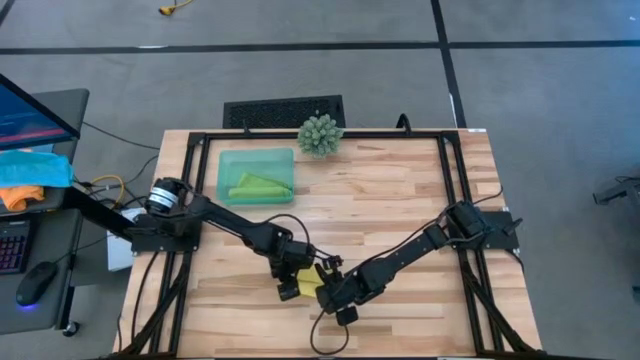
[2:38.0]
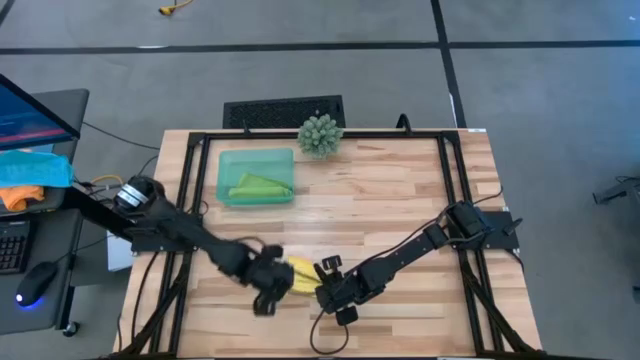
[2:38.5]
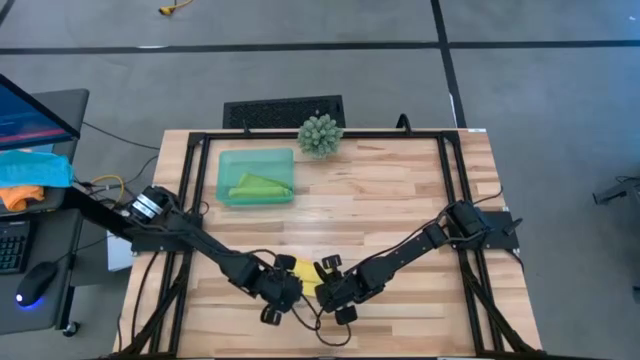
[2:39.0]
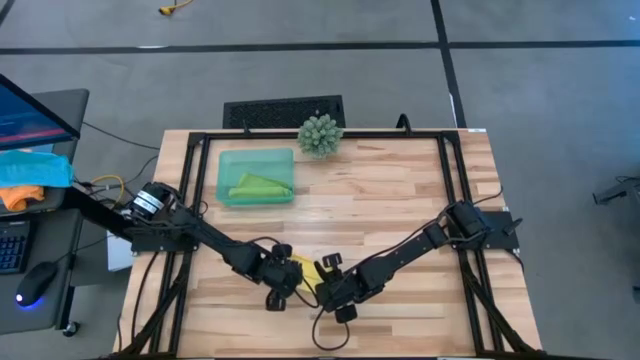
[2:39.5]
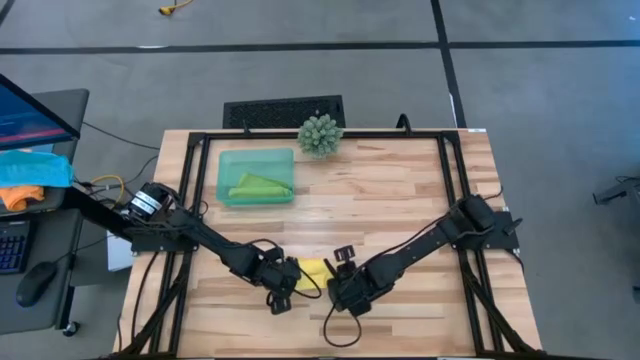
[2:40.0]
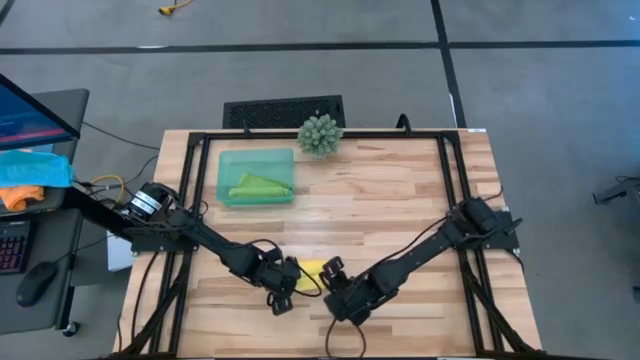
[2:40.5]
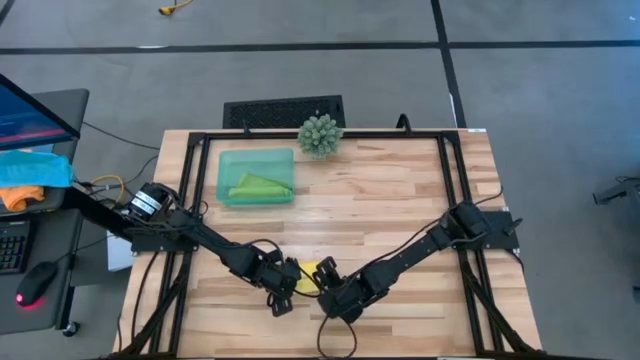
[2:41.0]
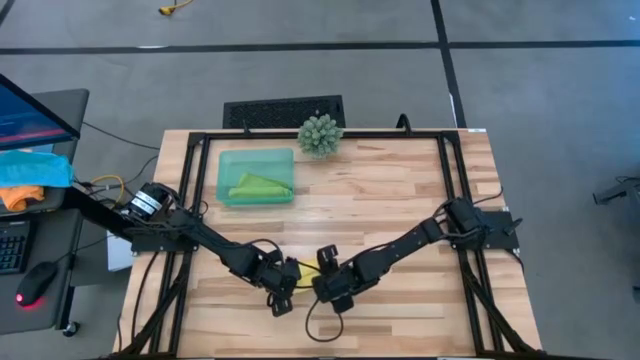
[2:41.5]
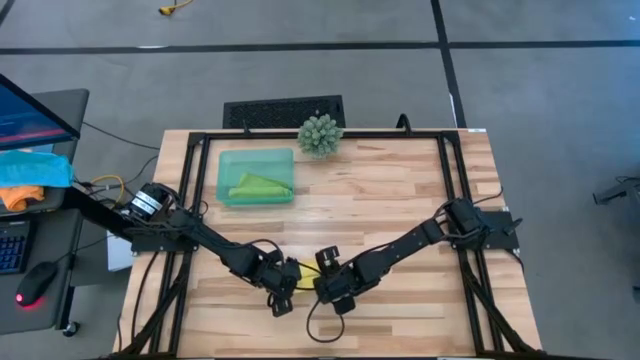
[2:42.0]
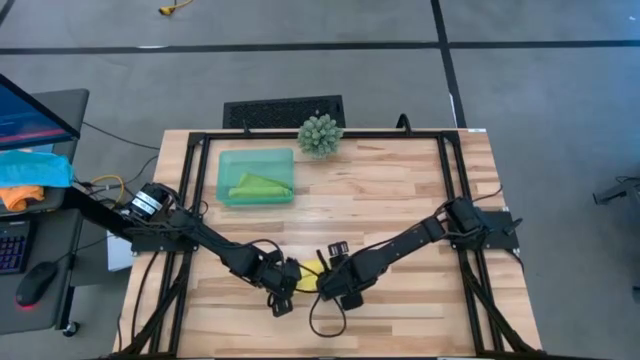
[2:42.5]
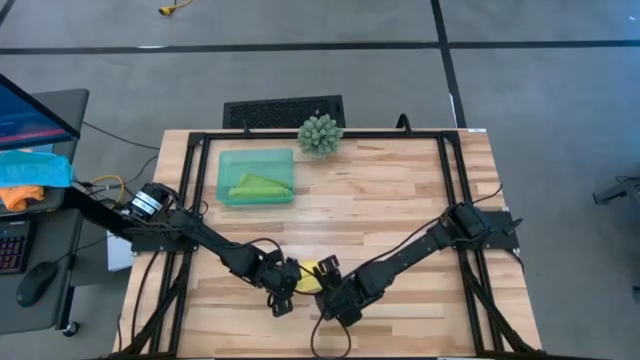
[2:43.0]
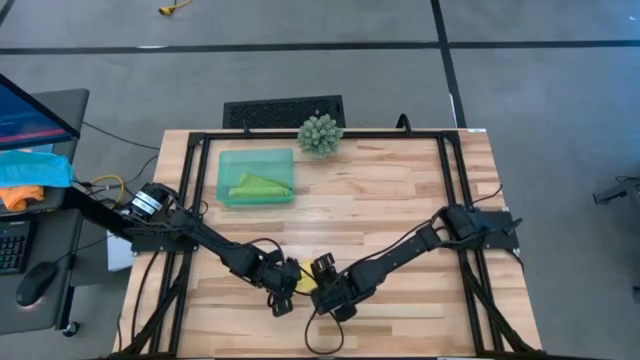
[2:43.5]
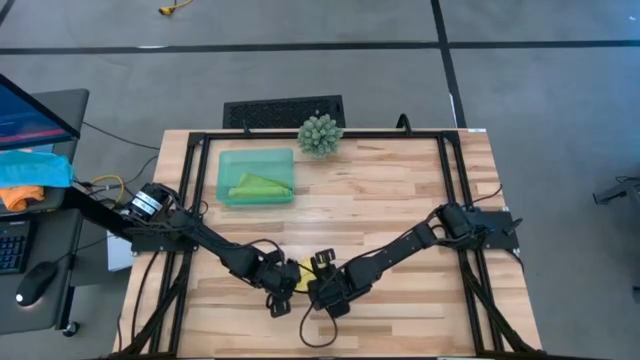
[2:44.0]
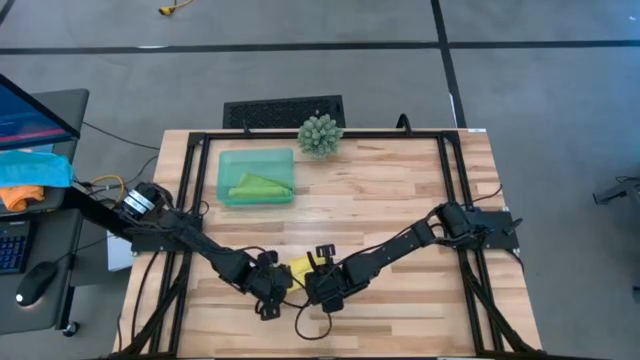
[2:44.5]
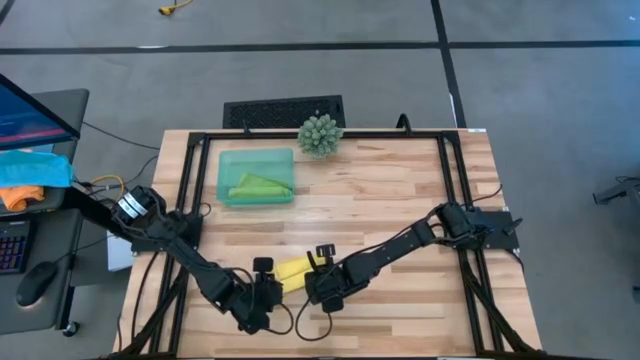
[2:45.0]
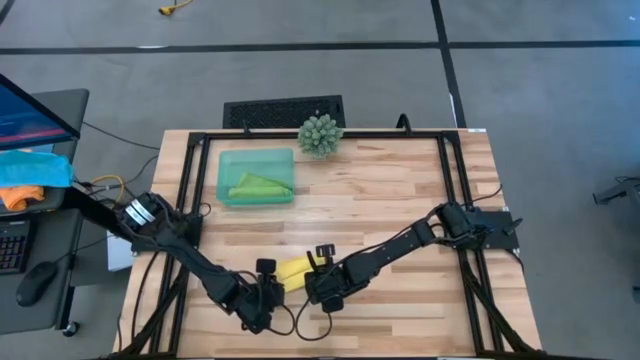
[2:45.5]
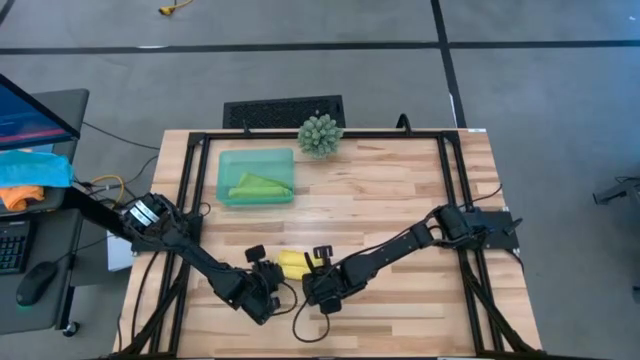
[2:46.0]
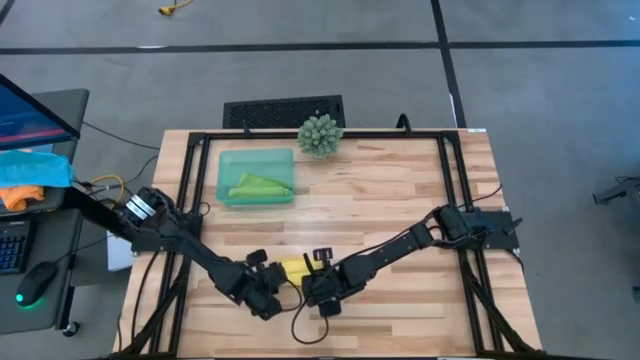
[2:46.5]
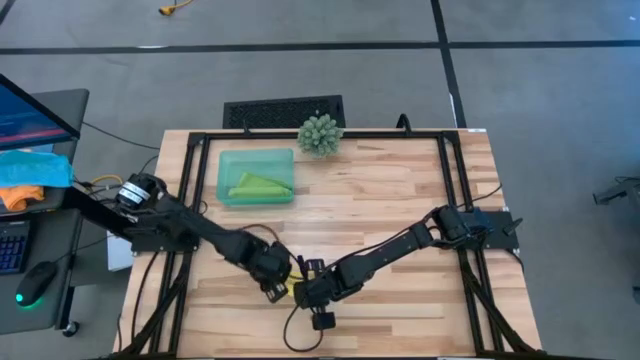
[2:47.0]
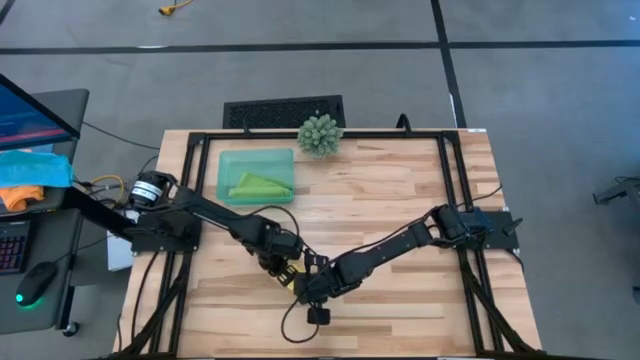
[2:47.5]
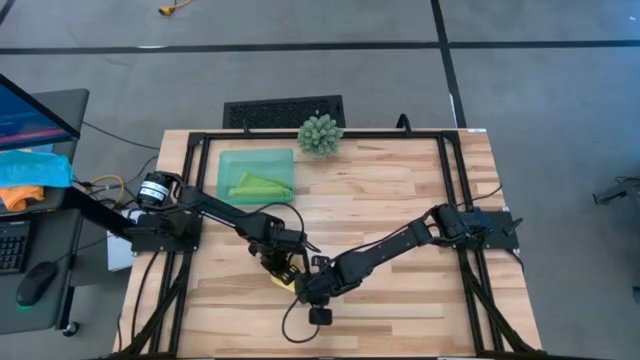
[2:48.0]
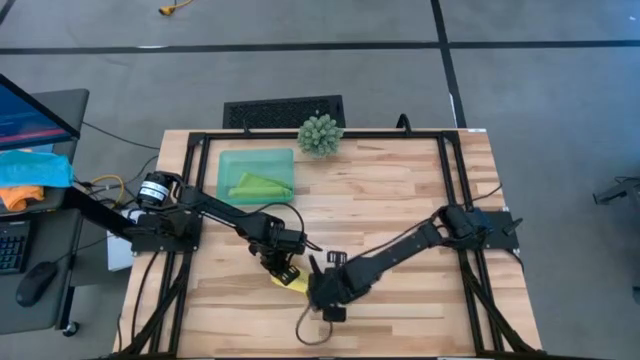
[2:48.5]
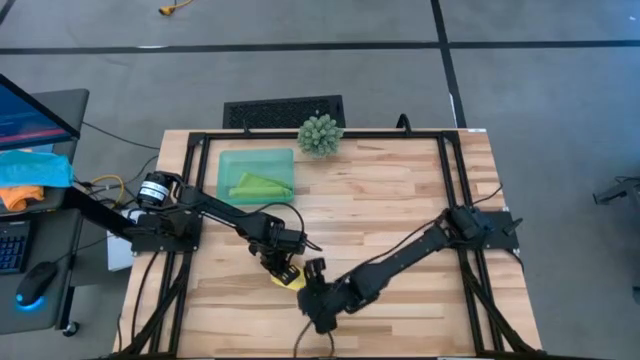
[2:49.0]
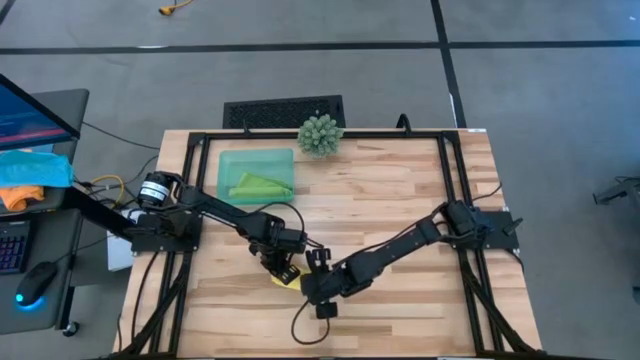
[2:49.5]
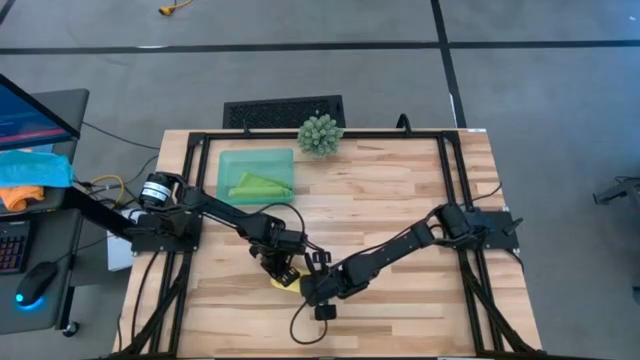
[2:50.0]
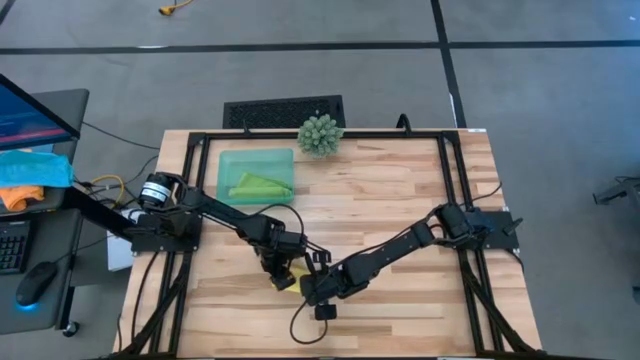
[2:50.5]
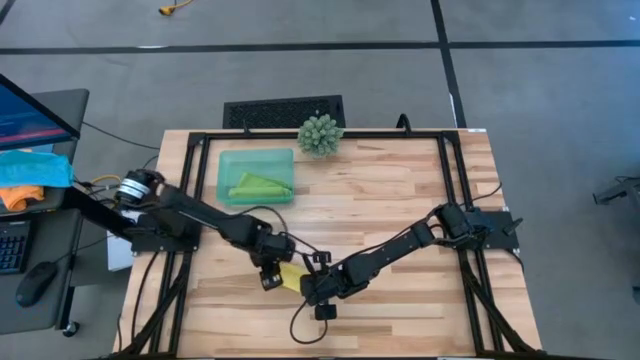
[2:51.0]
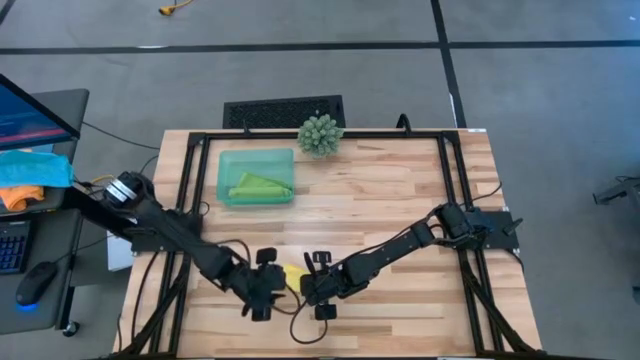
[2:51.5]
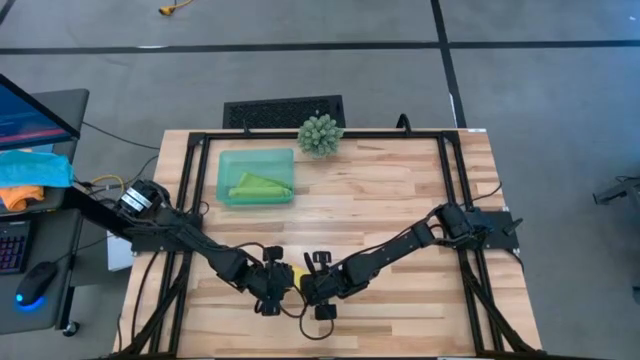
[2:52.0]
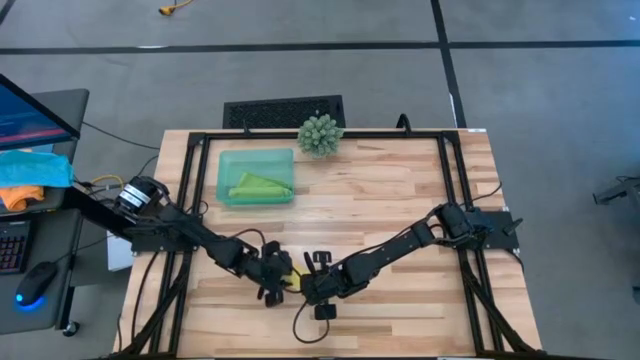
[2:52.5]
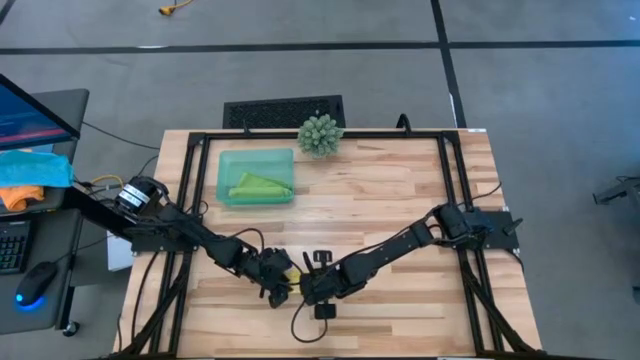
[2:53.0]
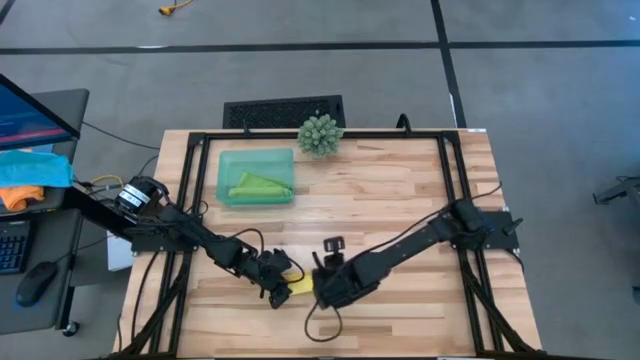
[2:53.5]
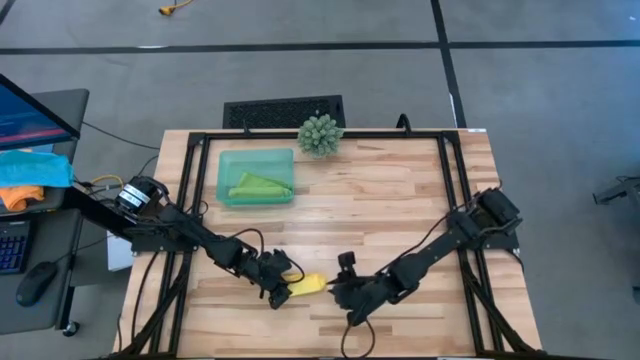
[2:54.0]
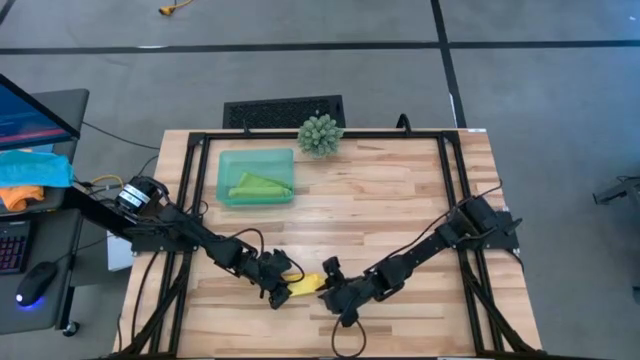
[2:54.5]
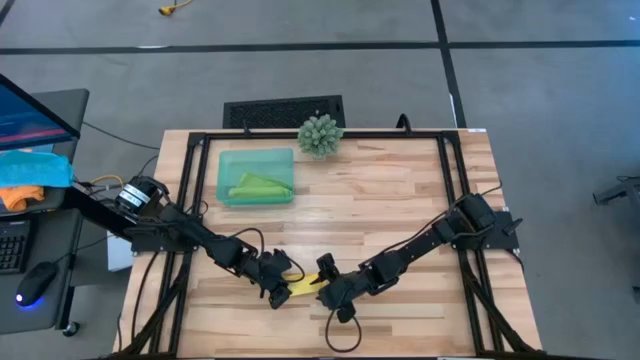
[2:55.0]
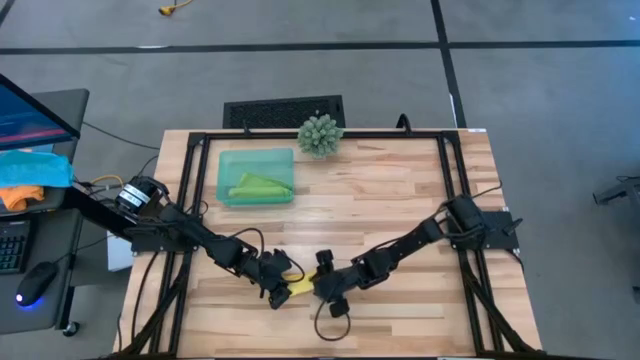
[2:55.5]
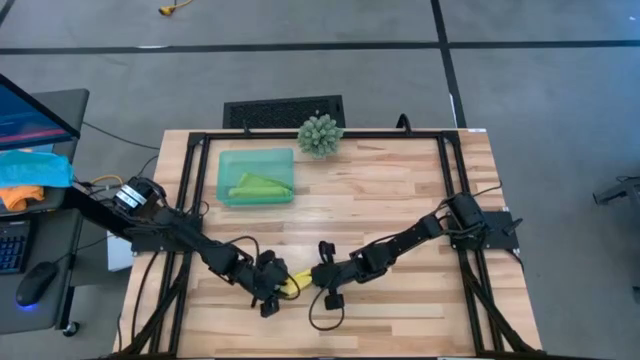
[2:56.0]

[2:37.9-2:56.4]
Task: Roll microfiber towels into tight, uniform cylinder then place into a basket
Roll the yellow towel

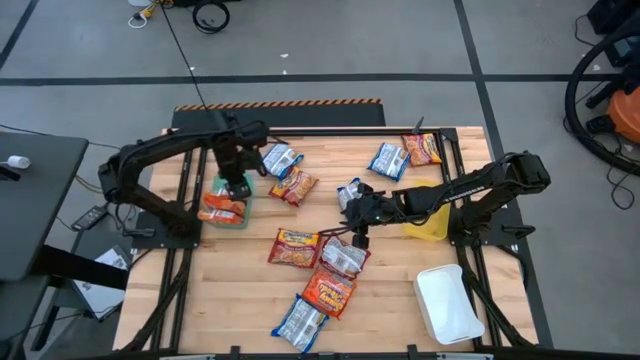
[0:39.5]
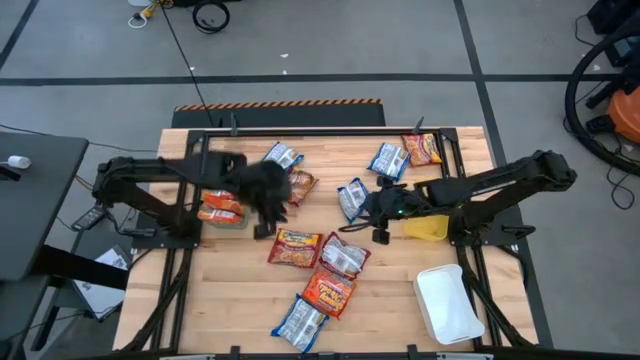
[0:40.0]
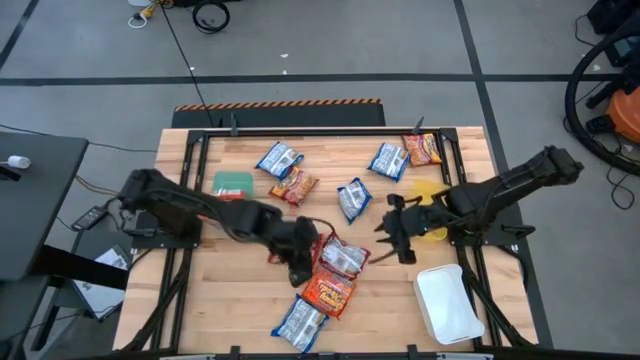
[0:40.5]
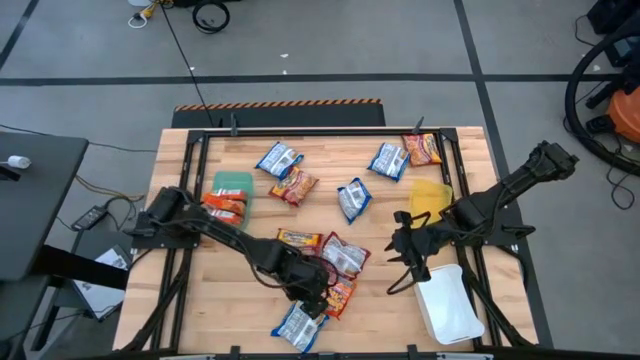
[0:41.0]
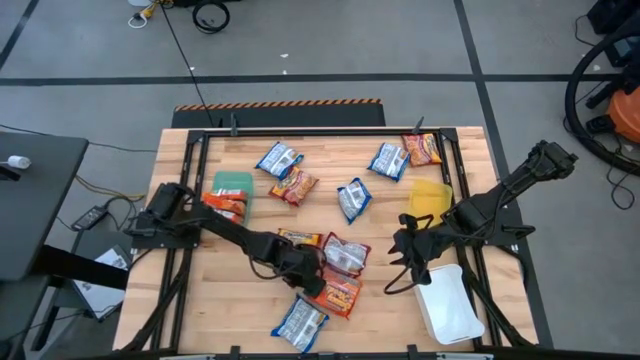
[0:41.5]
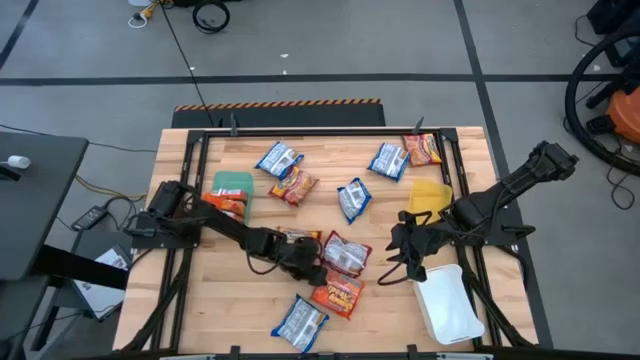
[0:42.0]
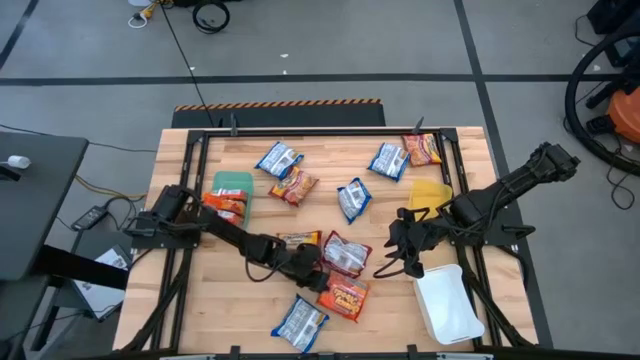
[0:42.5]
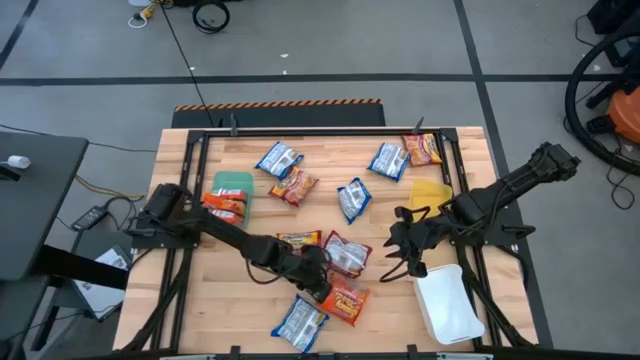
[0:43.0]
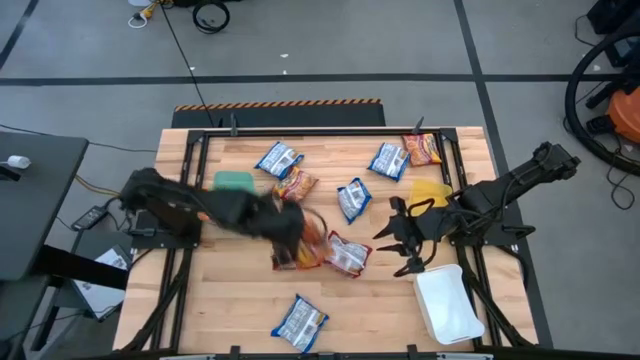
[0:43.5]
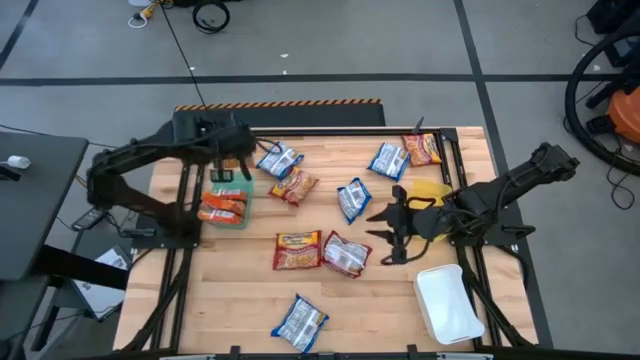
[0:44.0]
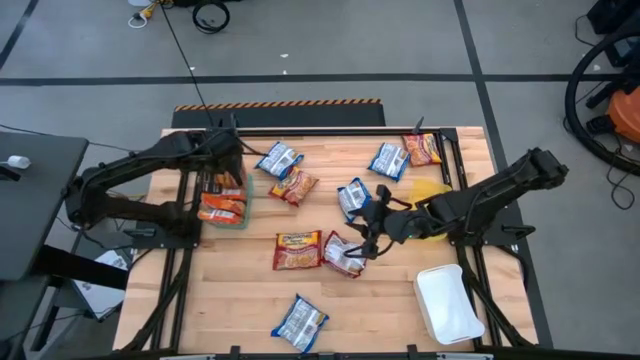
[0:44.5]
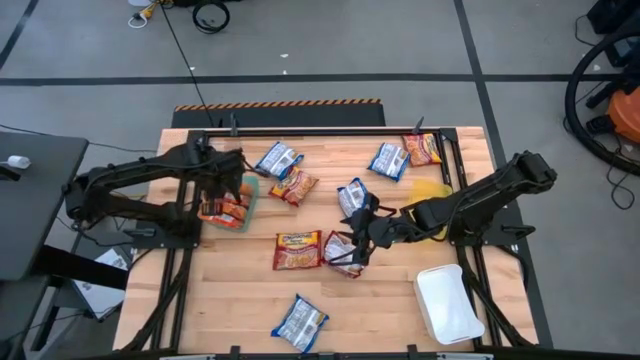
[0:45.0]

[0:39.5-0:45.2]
Task: Sort Maruchan noodles
Put the orange noodle pack into the green bin
